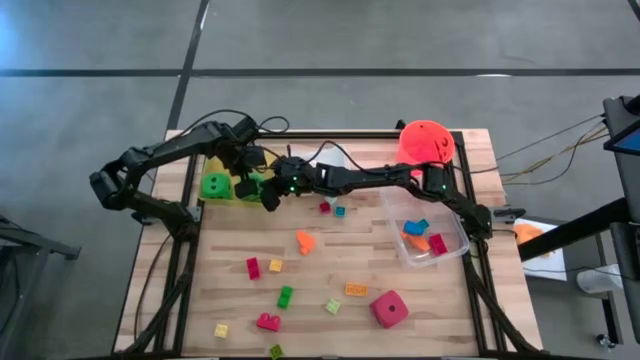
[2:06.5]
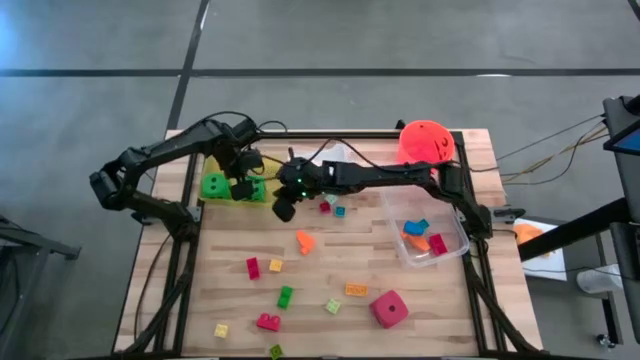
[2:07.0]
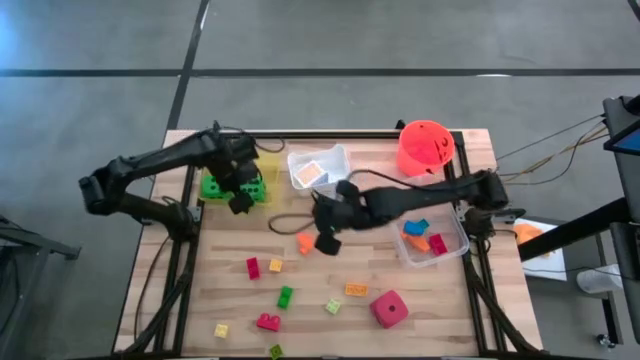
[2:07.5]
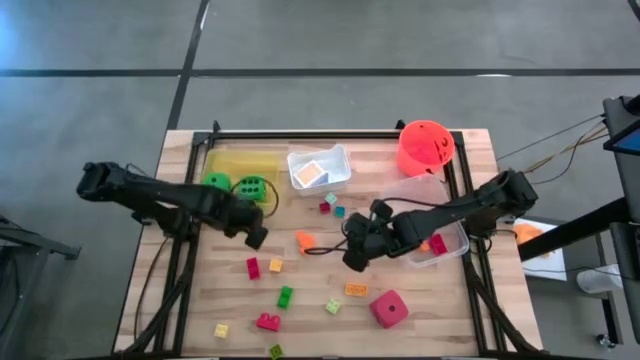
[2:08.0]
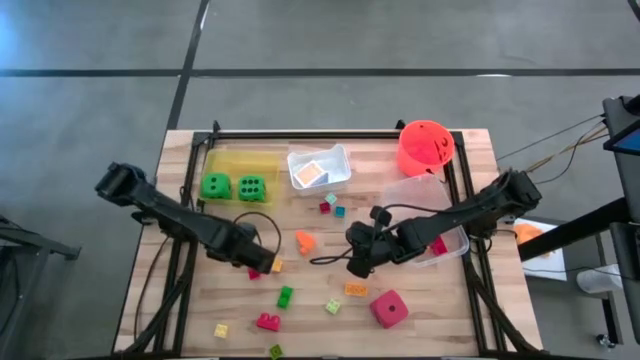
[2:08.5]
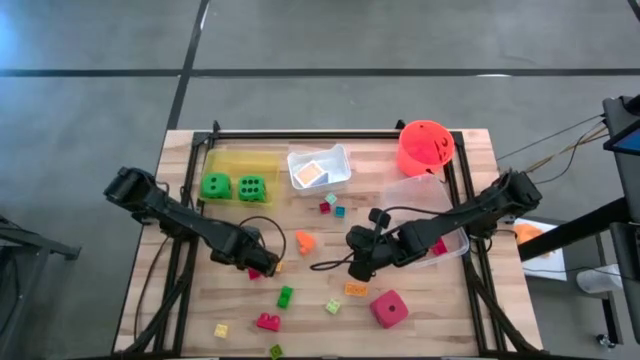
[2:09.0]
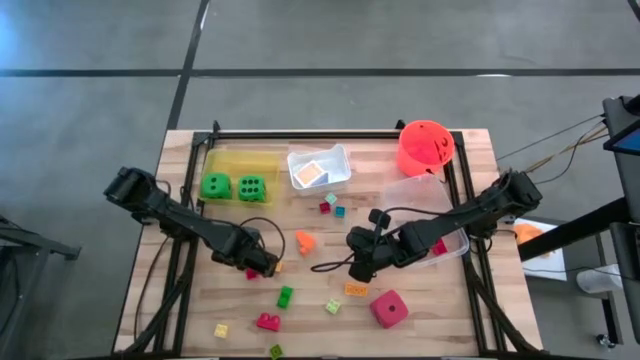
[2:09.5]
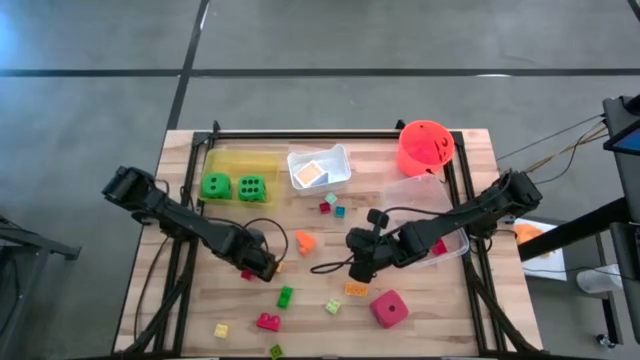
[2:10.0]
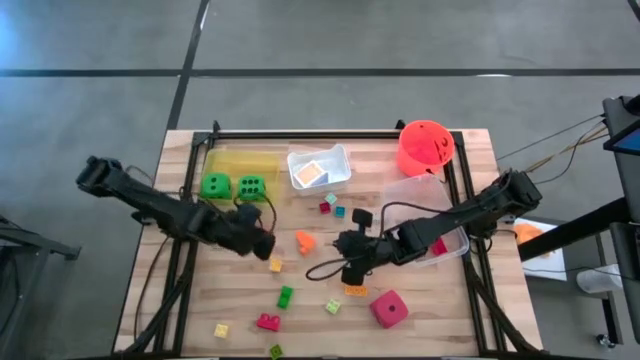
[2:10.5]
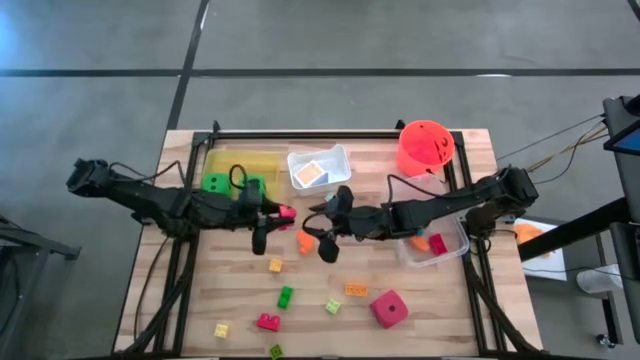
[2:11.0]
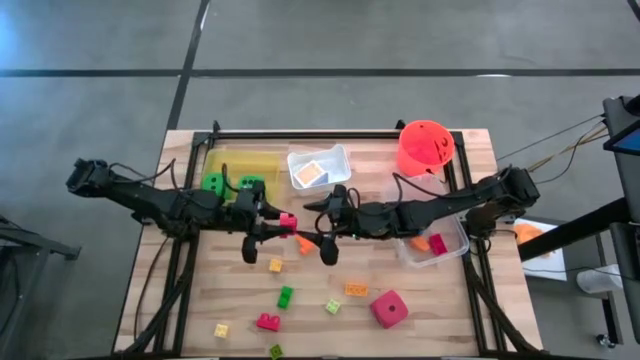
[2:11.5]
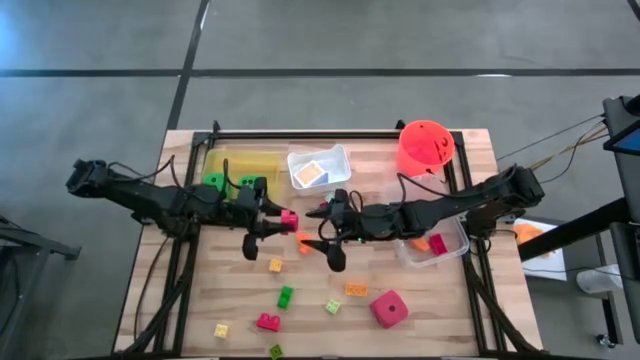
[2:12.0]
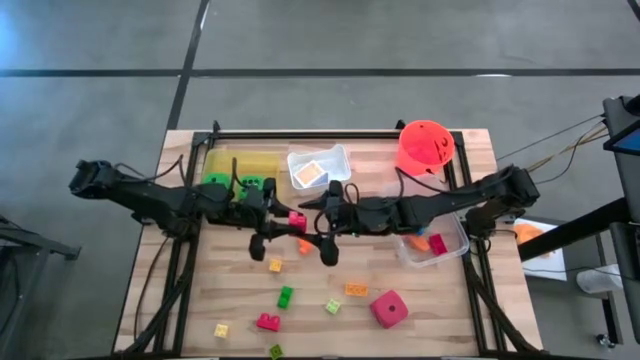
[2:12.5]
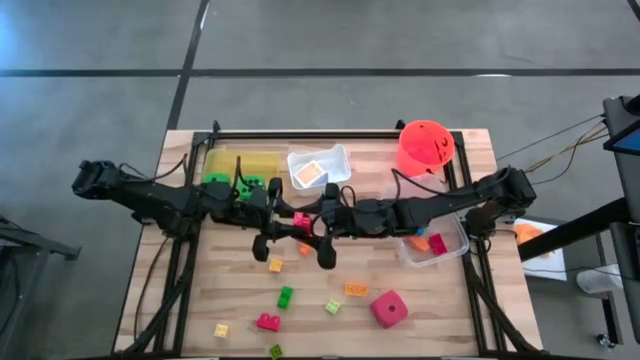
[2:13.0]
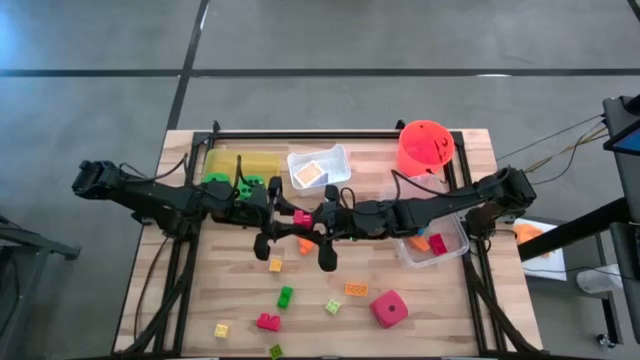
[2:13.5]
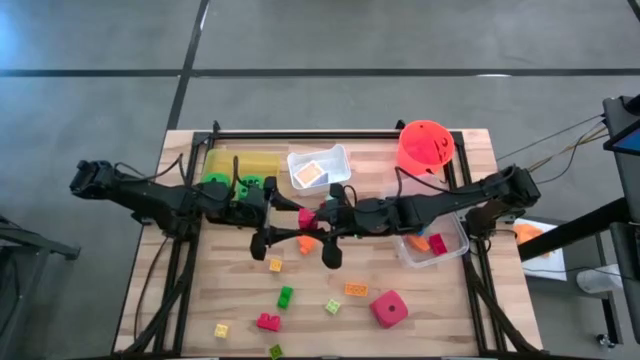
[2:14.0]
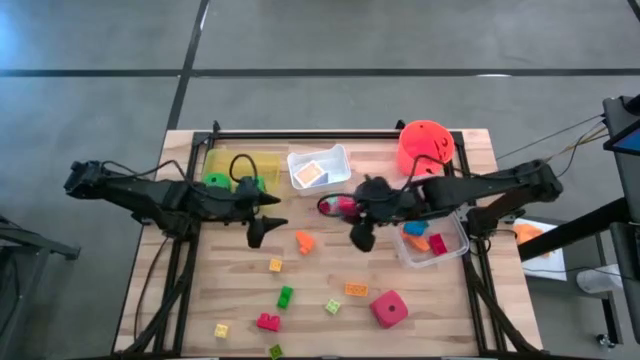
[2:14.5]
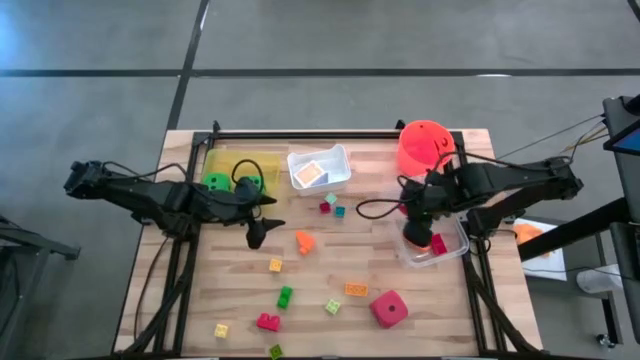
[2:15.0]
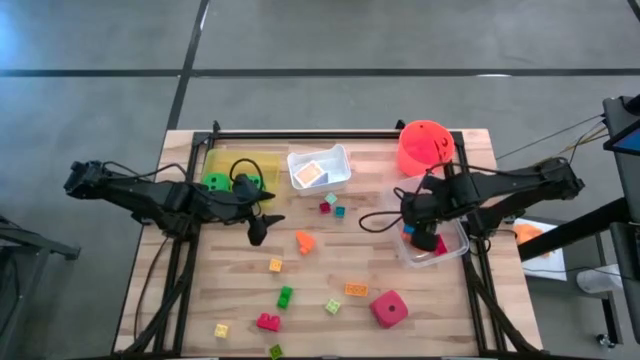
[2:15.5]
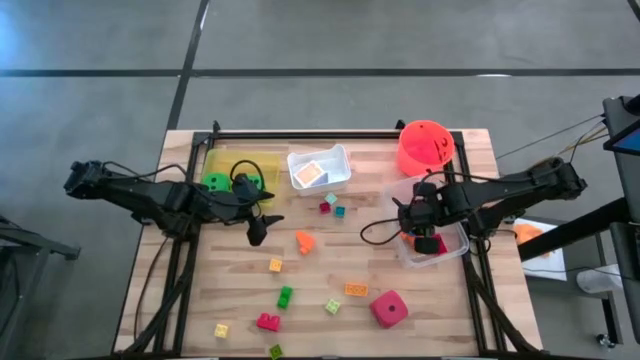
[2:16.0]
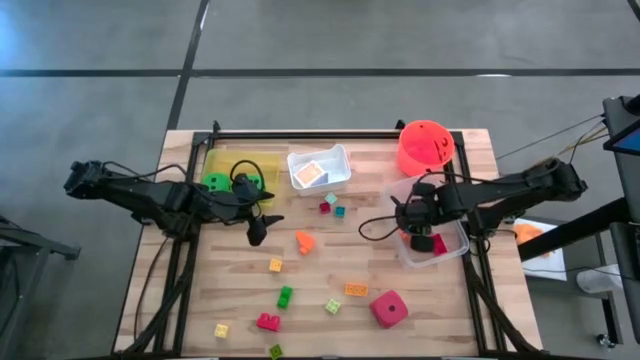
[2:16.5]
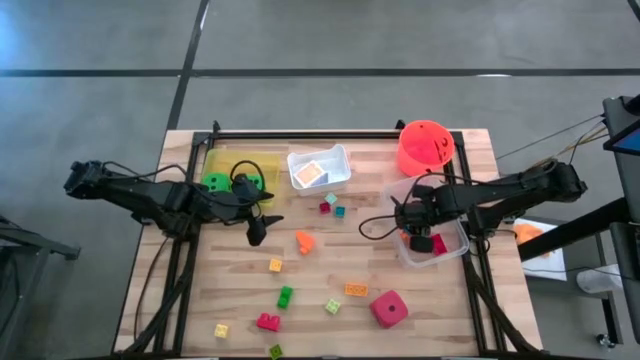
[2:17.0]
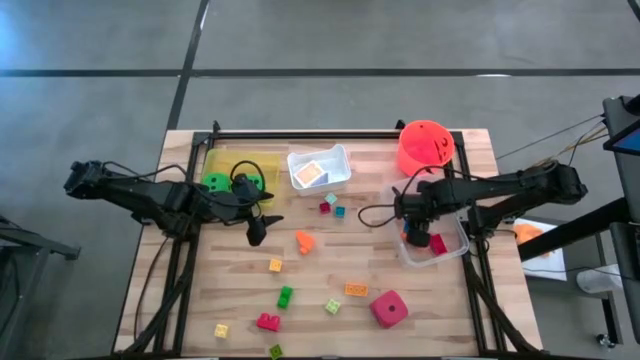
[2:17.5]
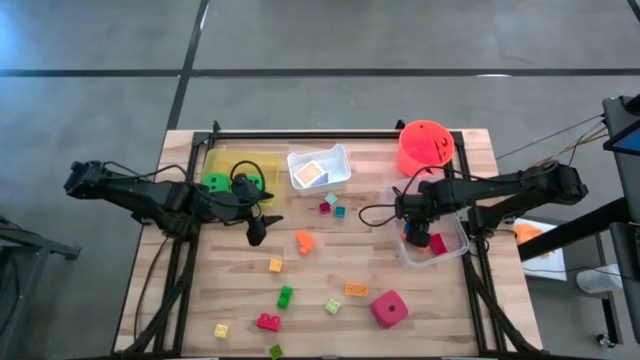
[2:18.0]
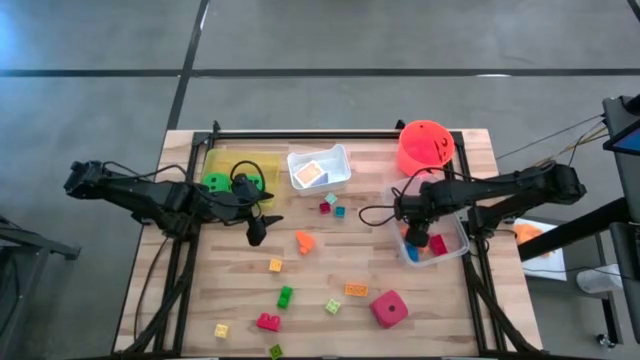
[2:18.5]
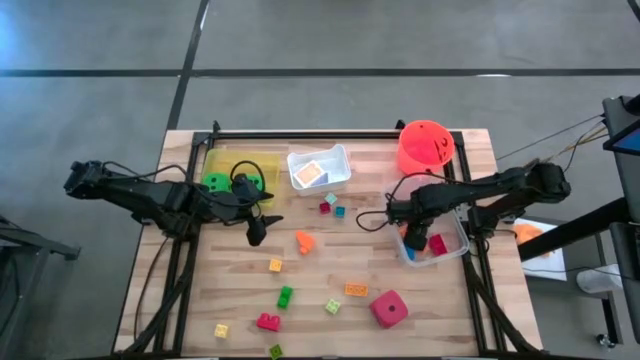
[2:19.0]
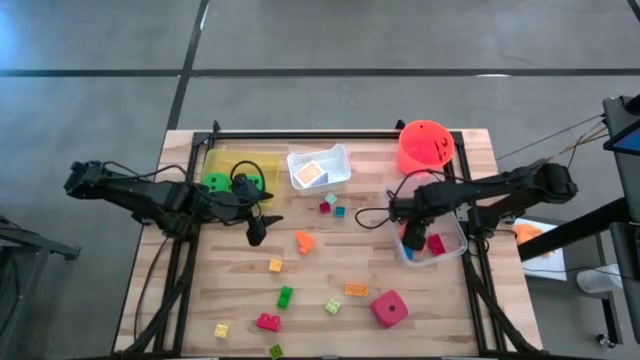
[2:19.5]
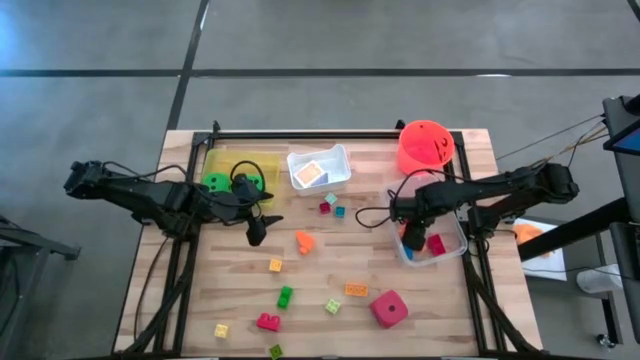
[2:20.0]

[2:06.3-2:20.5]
Task: Pick & Place Toys
Put the red game piece into the transparent bin

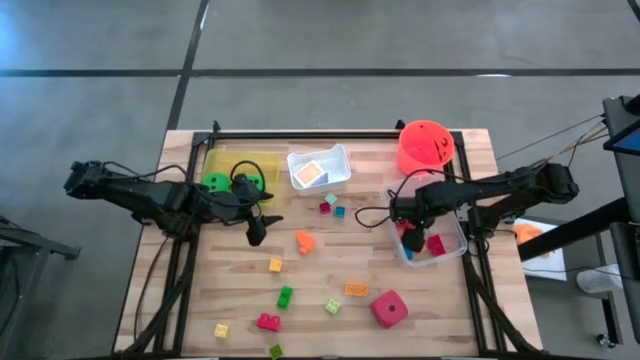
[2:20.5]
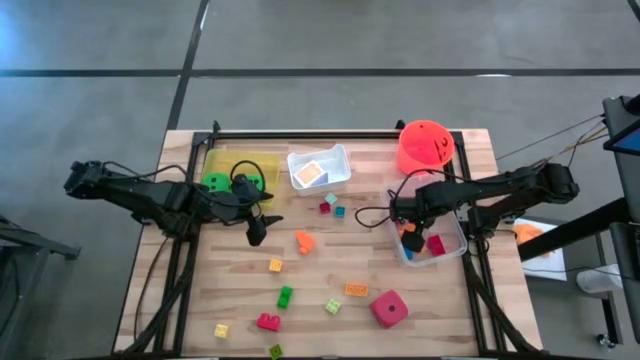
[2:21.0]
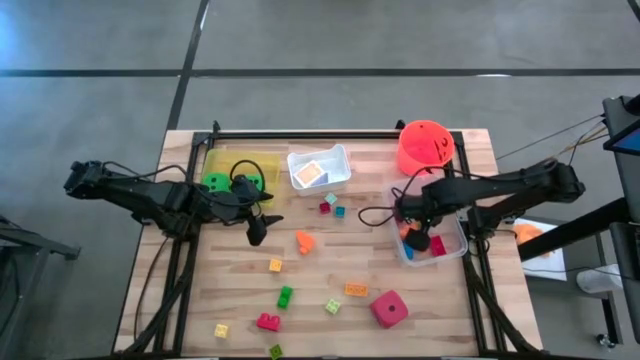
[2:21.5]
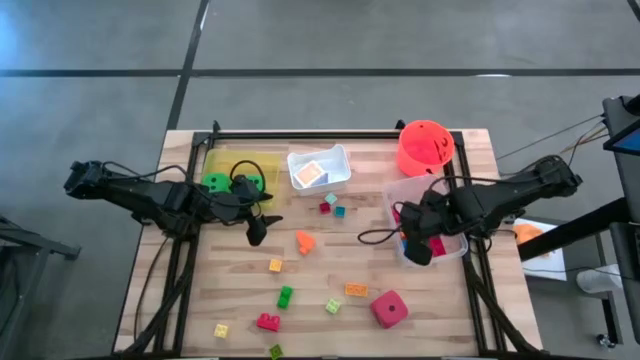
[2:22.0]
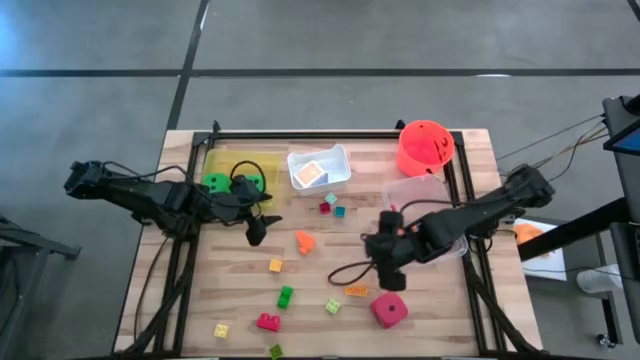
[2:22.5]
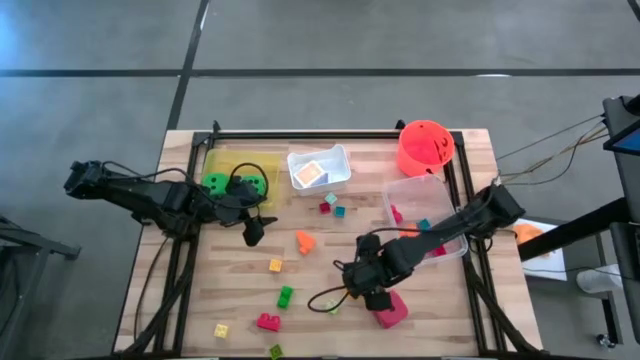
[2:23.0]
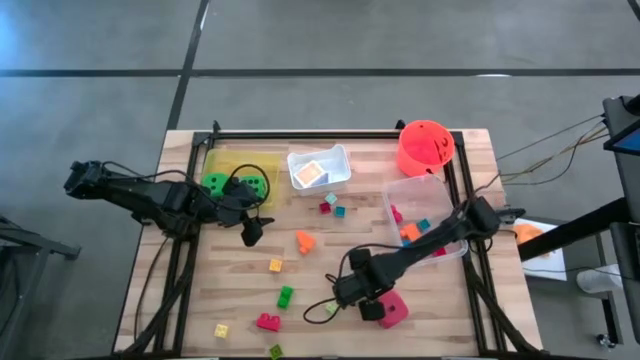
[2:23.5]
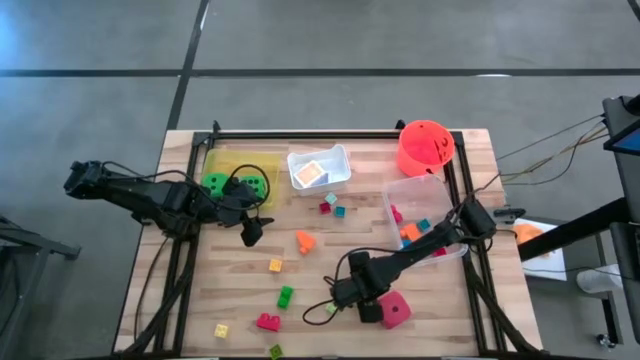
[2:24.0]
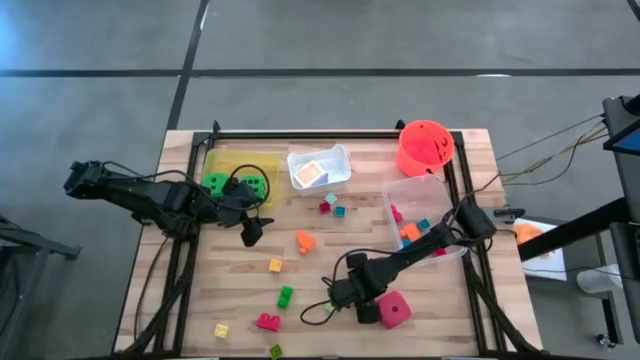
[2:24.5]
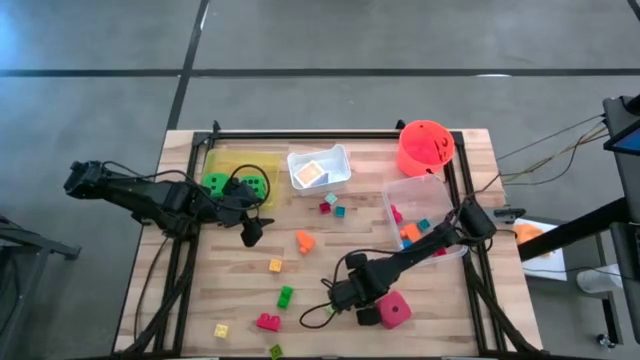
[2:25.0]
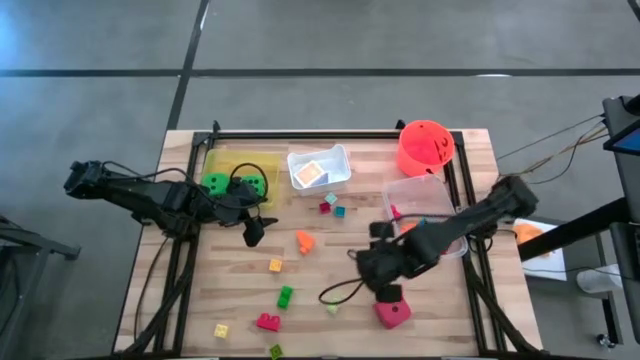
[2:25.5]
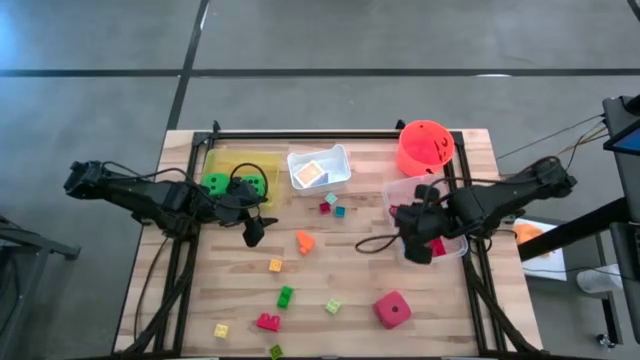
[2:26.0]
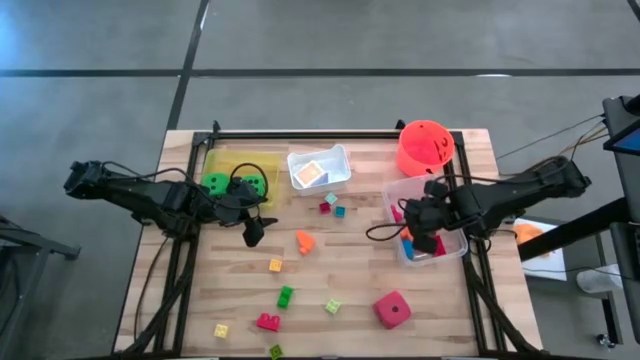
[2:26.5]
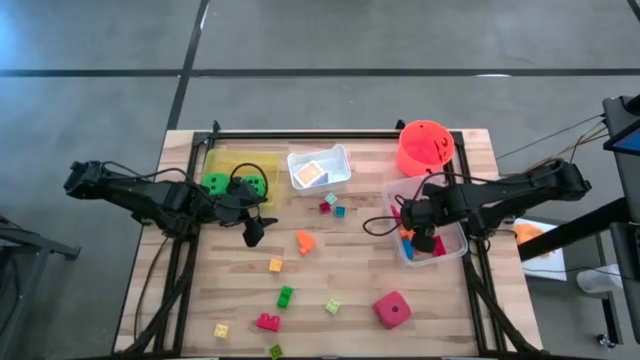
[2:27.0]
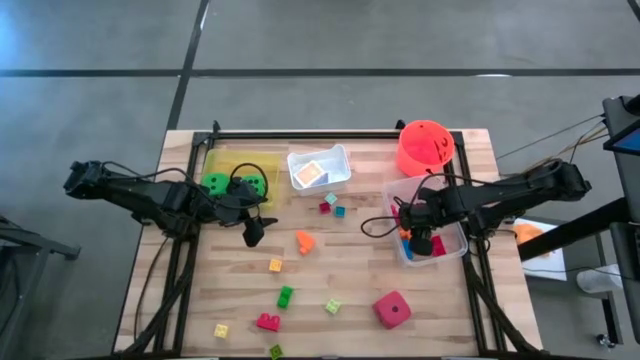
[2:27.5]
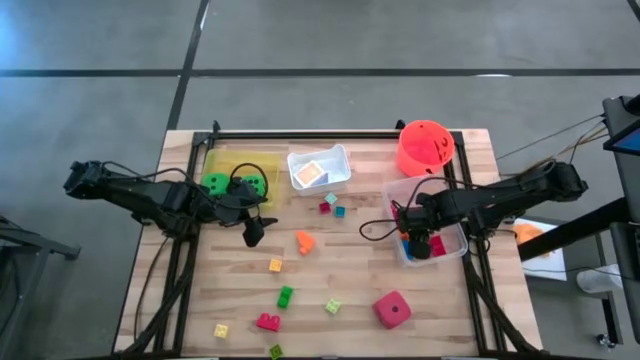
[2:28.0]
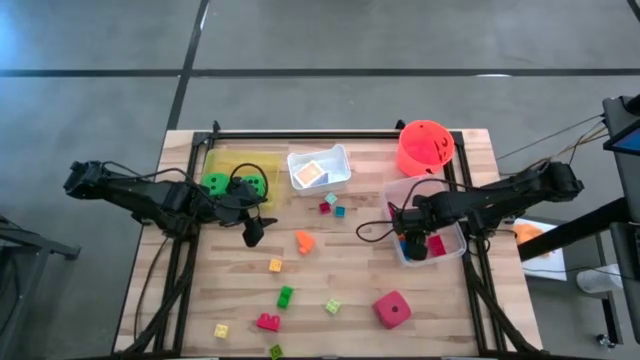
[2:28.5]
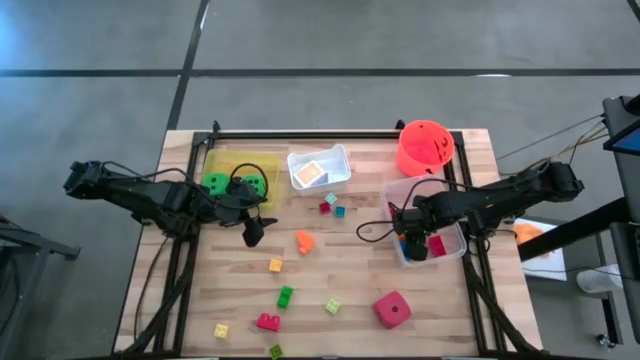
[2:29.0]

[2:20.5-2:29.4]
Put the dark yellow game piece into the transparent bin
